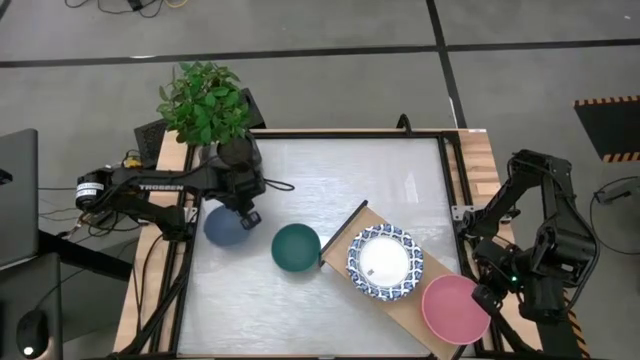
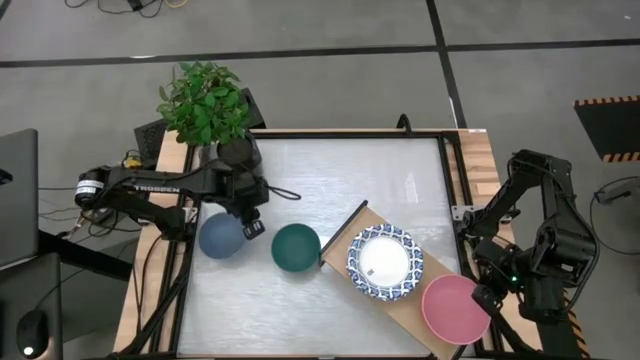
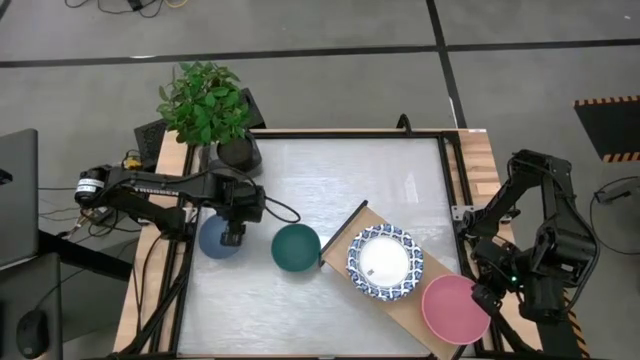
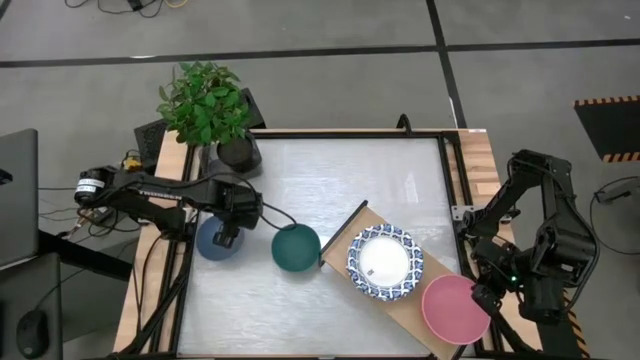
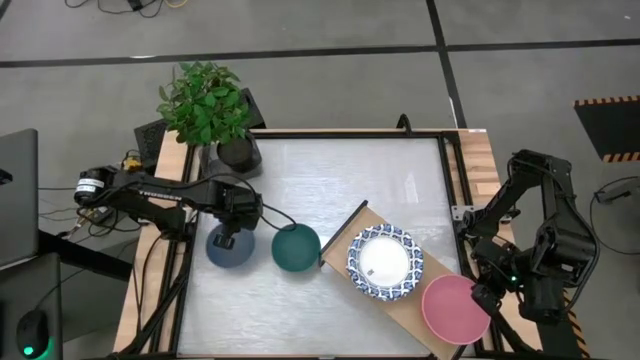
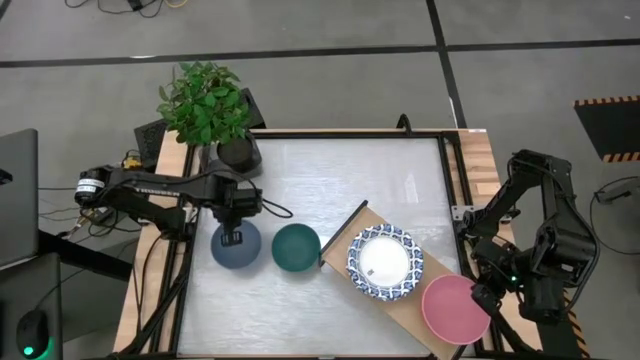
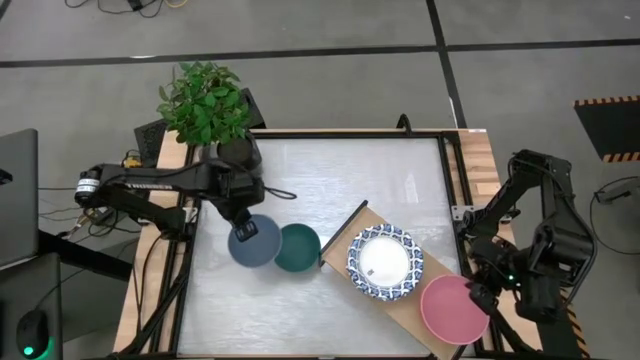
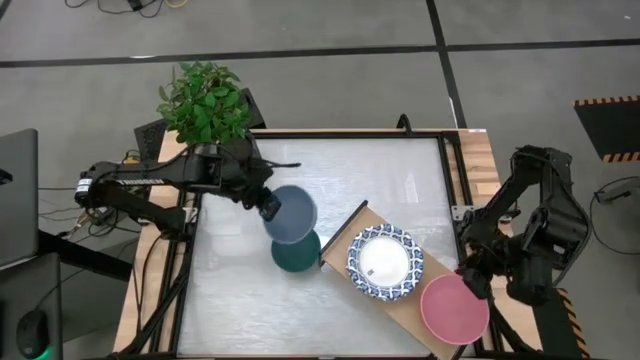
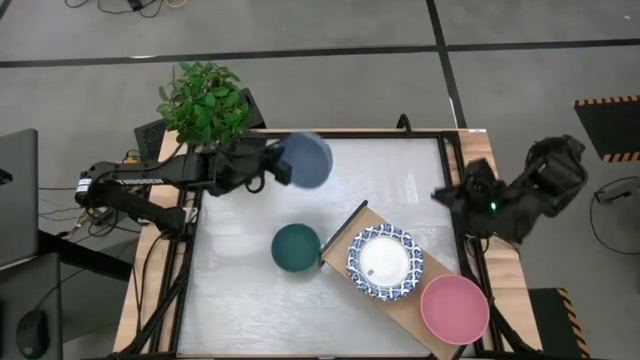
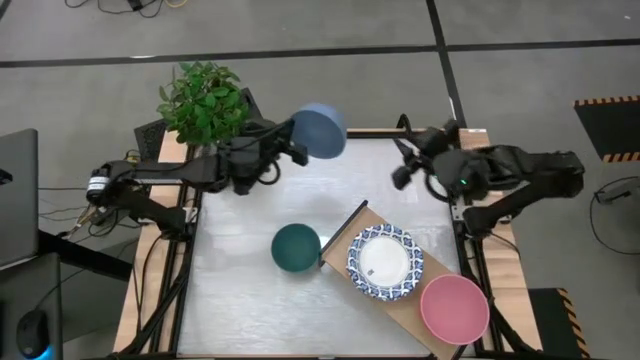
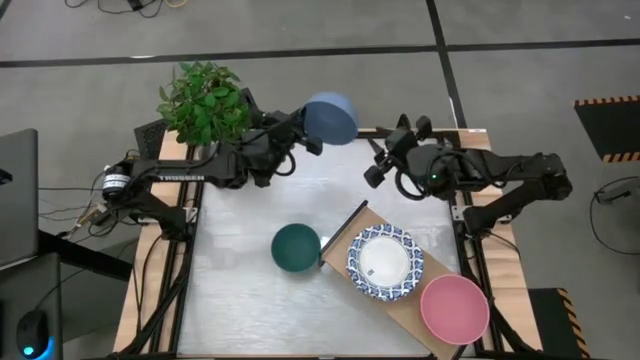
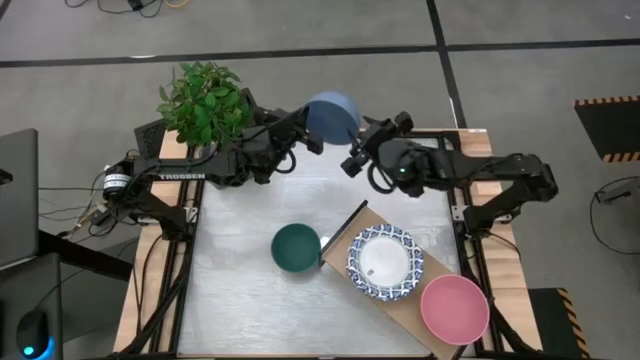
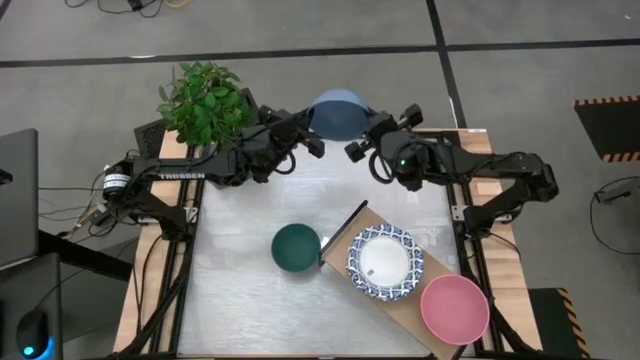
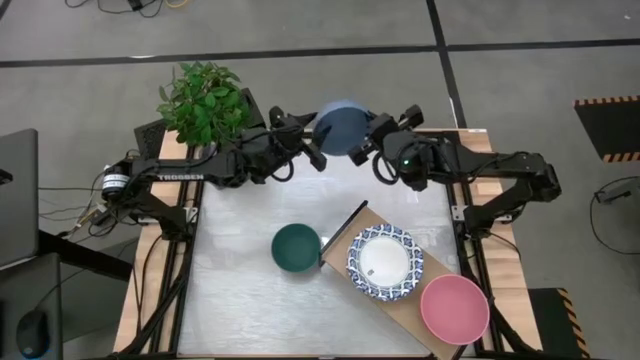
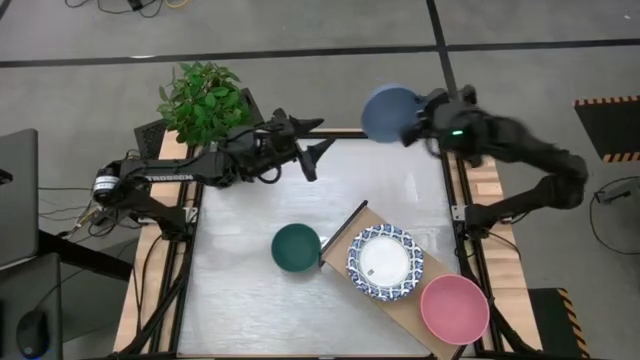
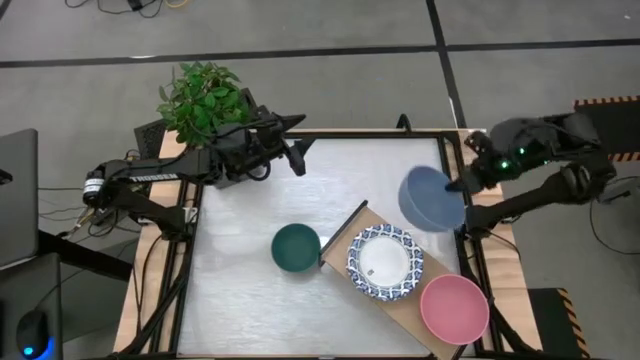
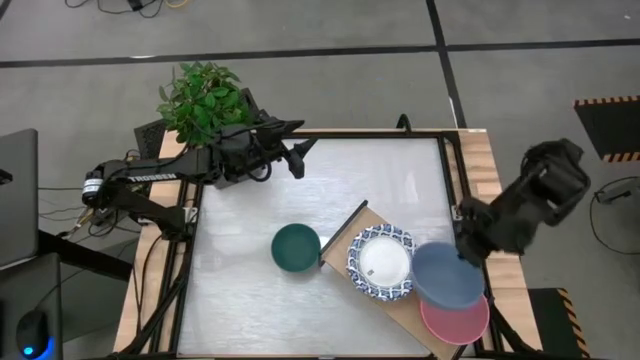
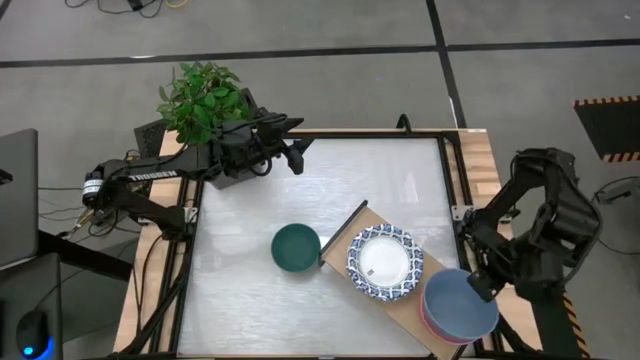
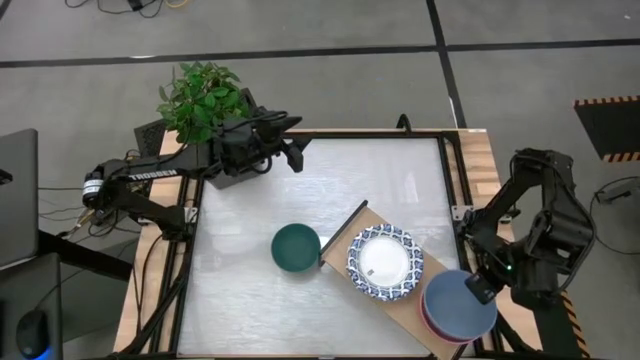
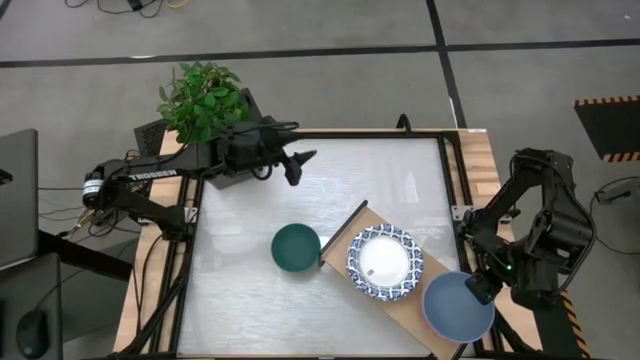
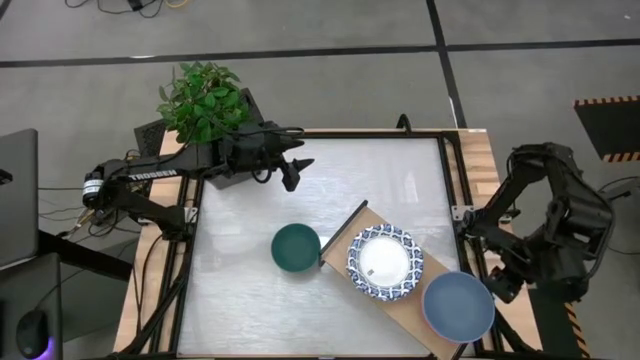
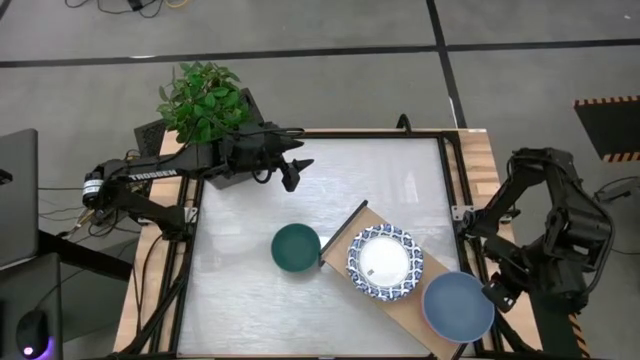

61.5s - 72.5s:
Task: Place and stack bowls onto a shelf
Stack the blue bowl on top of the pink bowl on the shelf

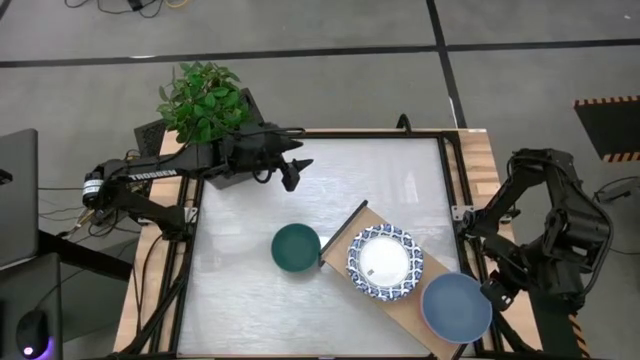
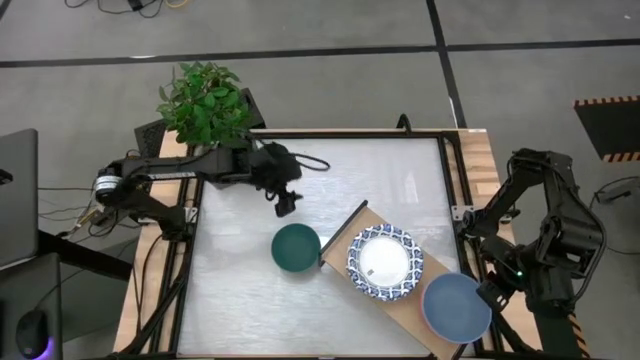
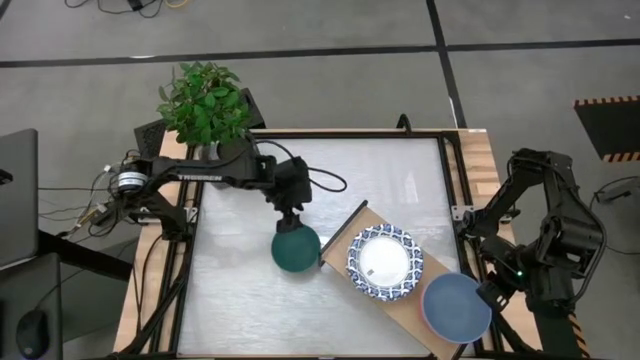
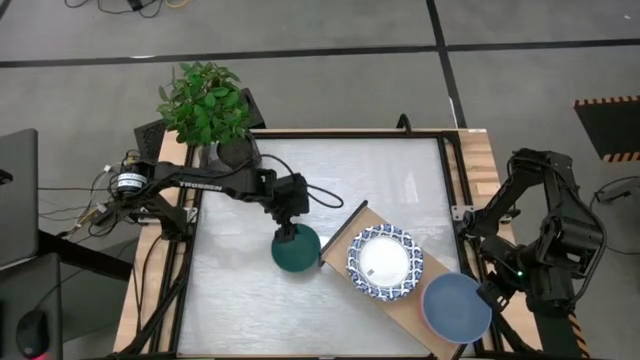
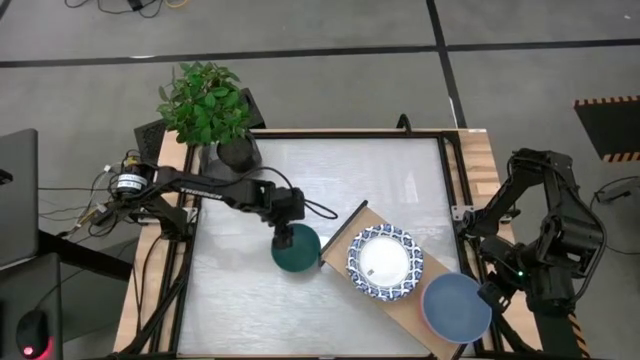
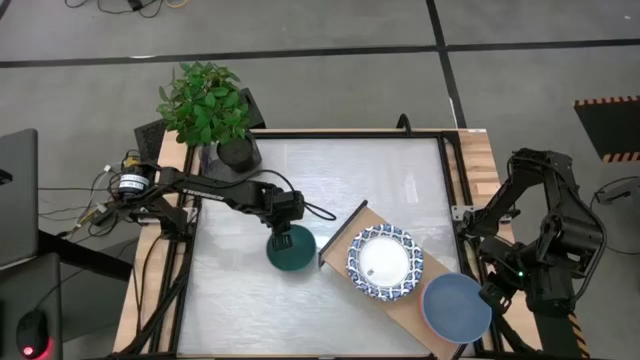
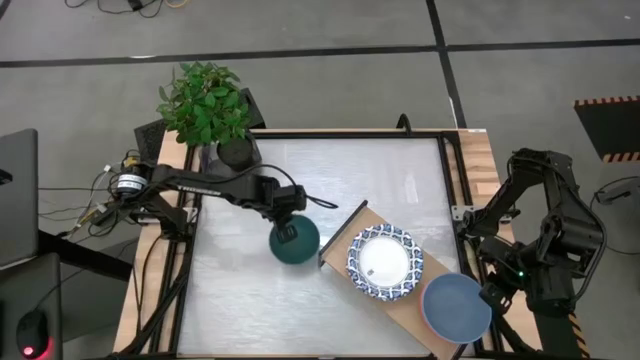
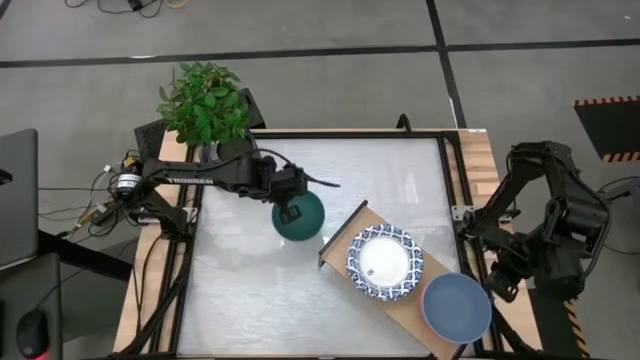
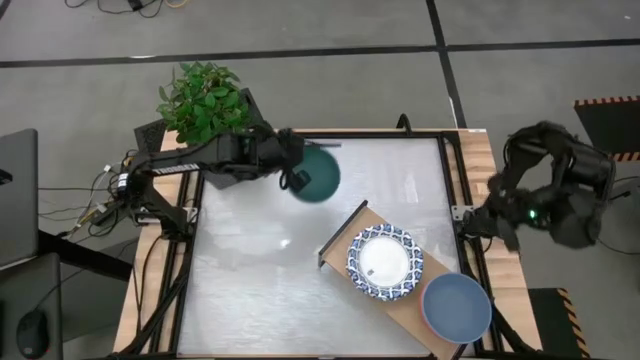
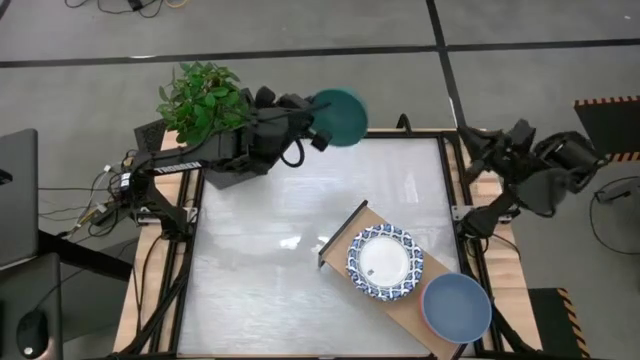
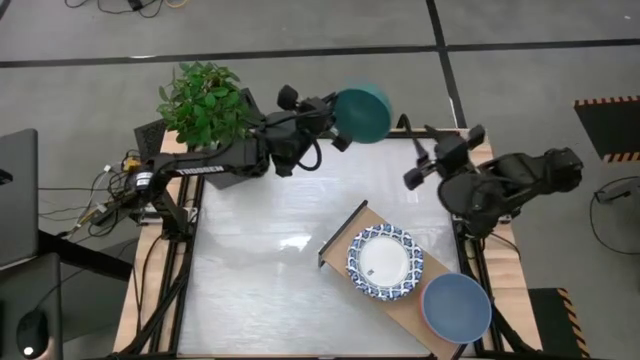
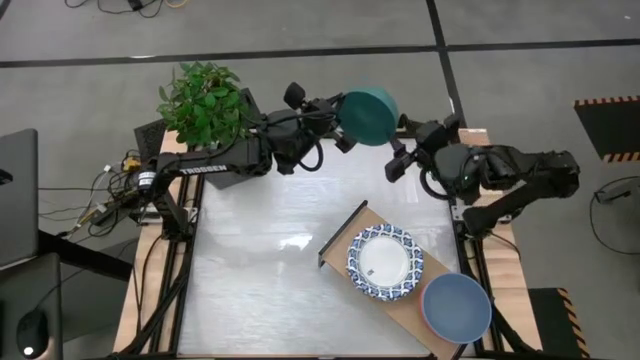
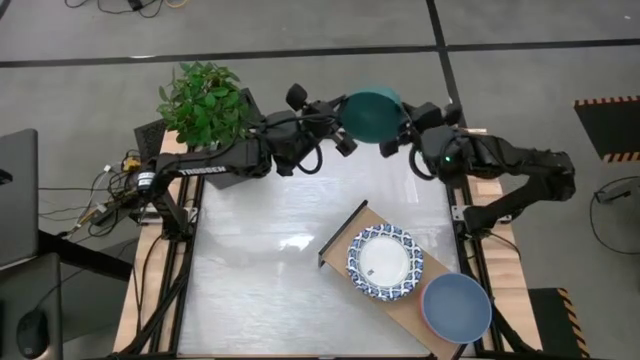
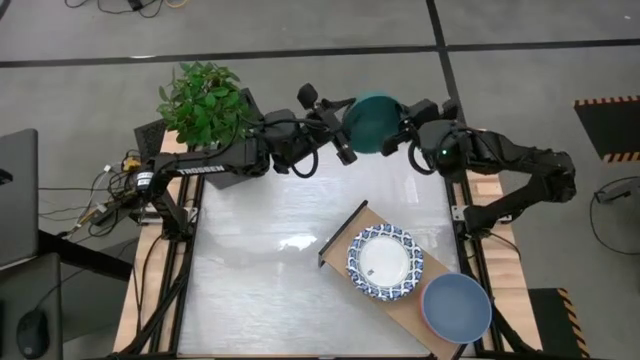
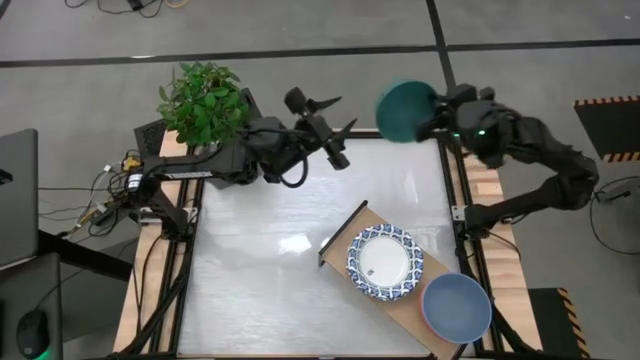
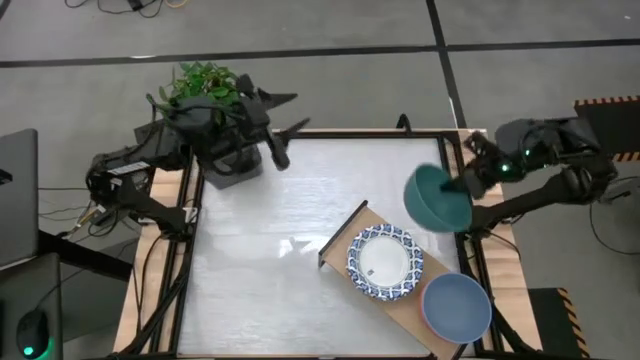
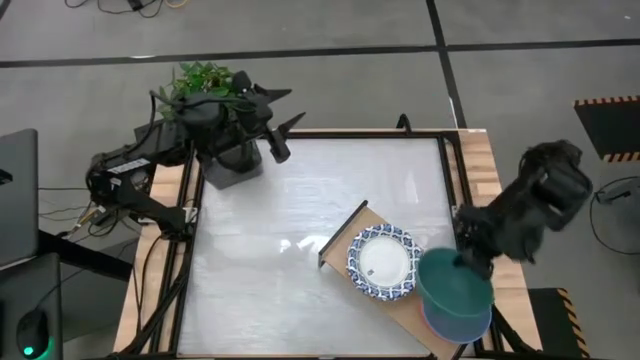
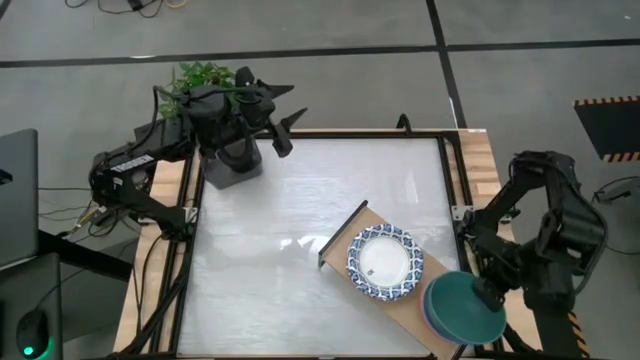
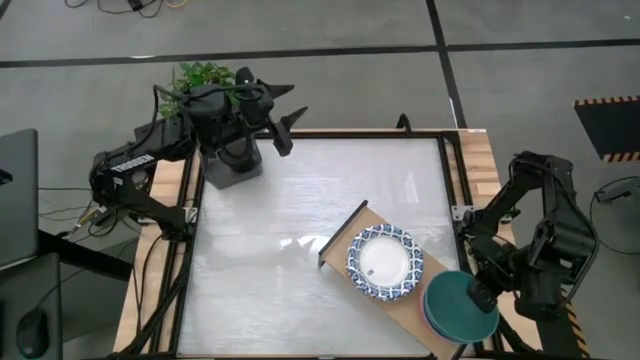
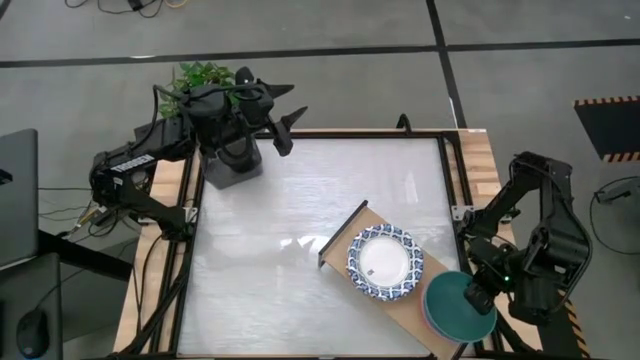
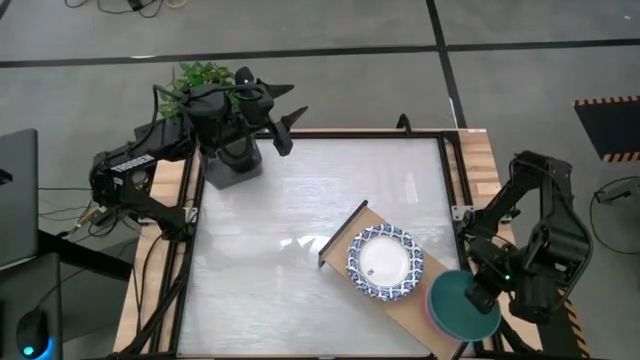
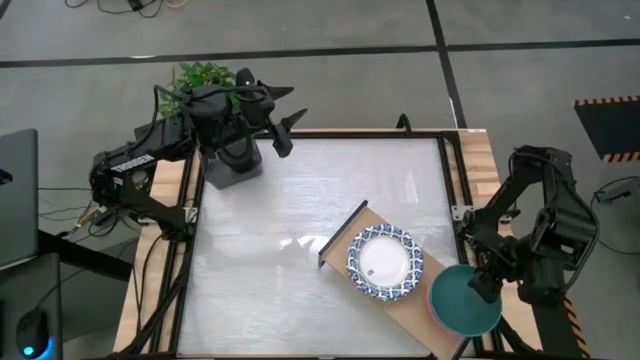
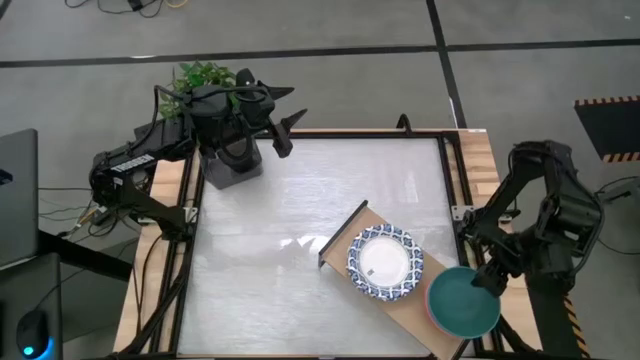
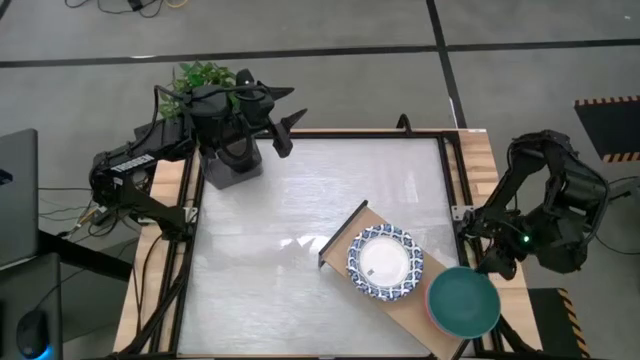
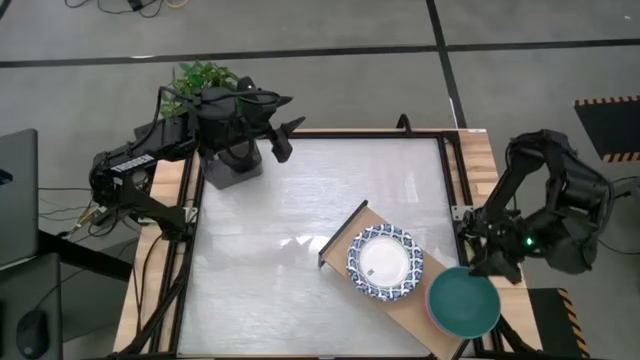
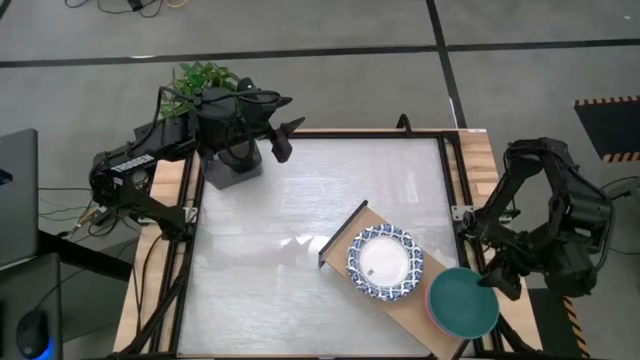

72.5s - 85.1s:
Stack the green bowl on top of the blue bowl on the shelf
